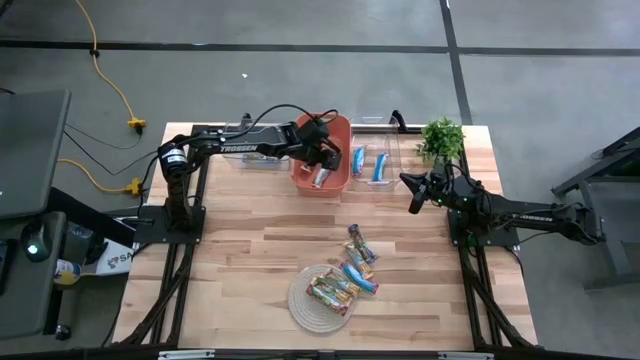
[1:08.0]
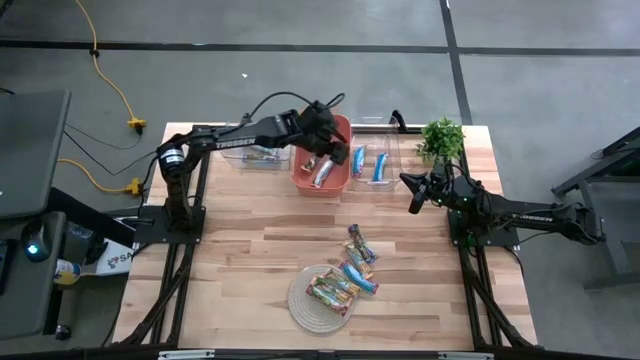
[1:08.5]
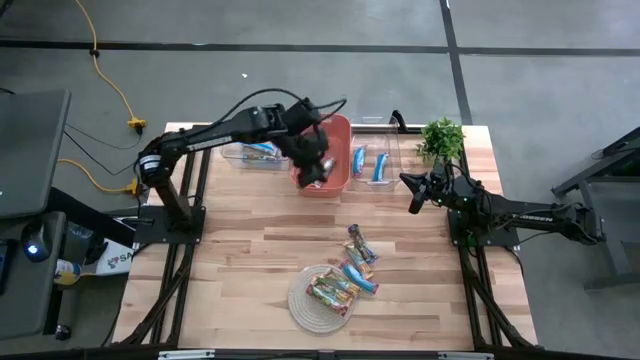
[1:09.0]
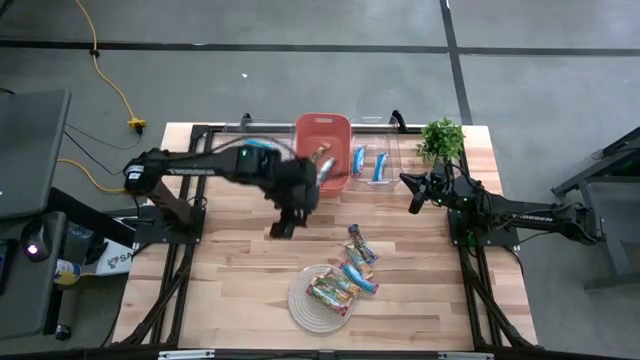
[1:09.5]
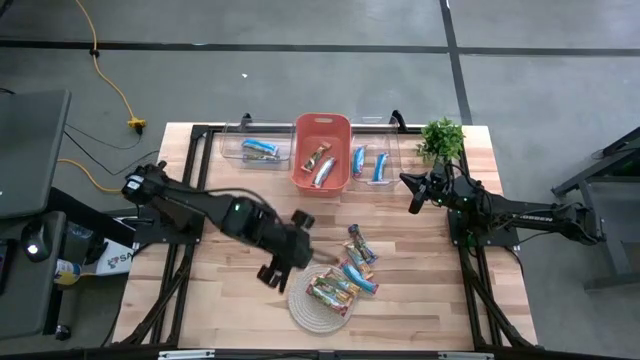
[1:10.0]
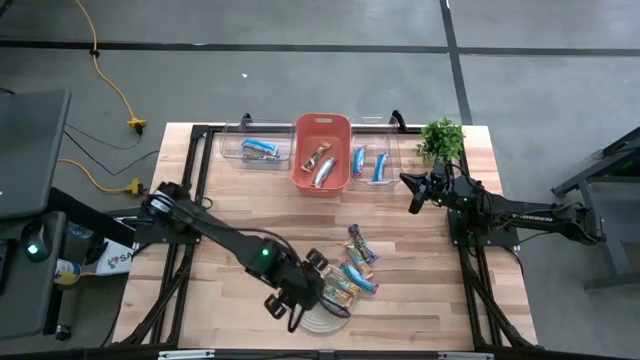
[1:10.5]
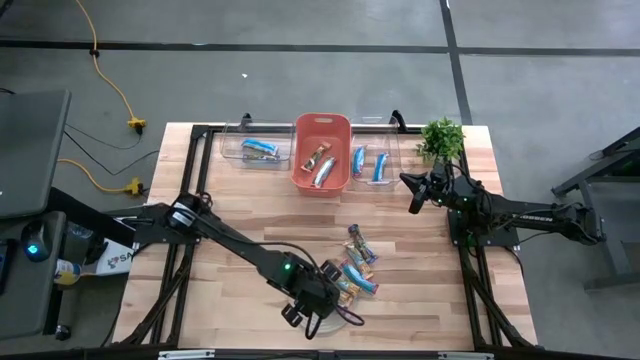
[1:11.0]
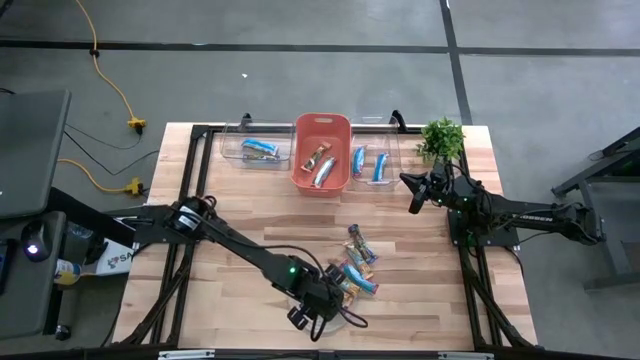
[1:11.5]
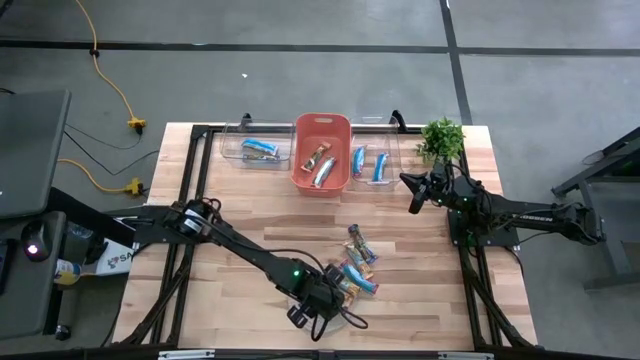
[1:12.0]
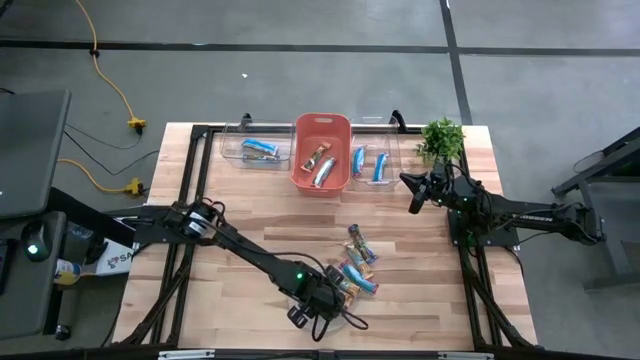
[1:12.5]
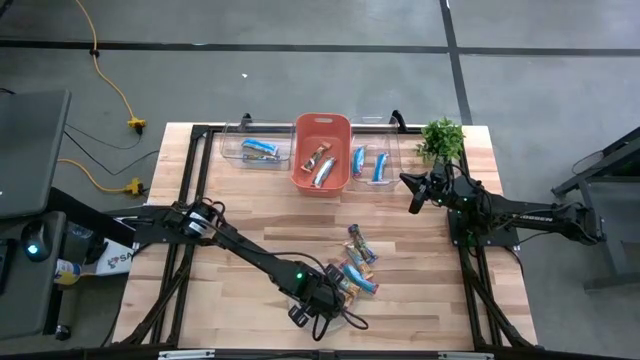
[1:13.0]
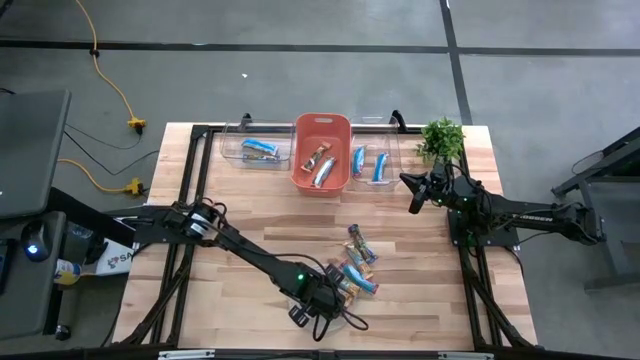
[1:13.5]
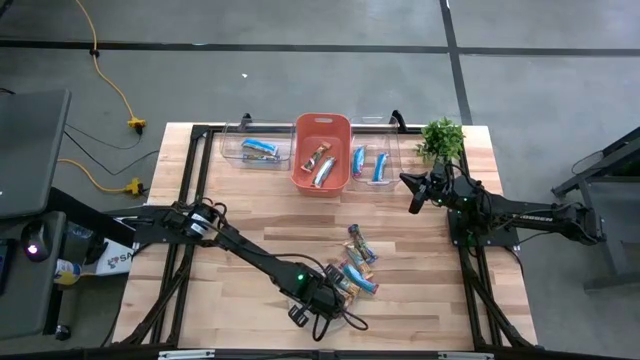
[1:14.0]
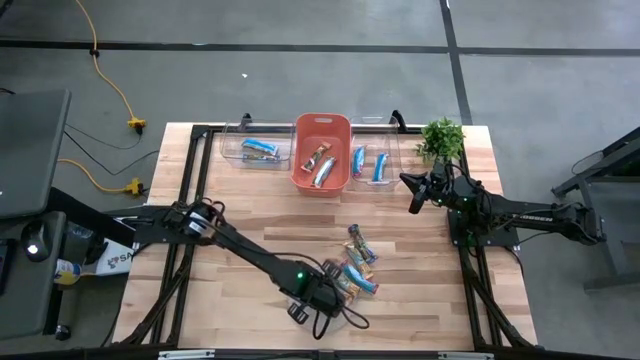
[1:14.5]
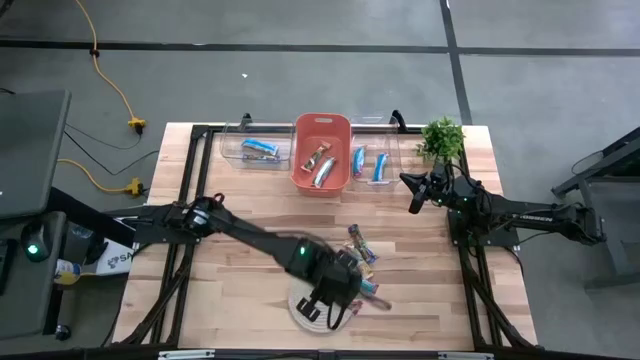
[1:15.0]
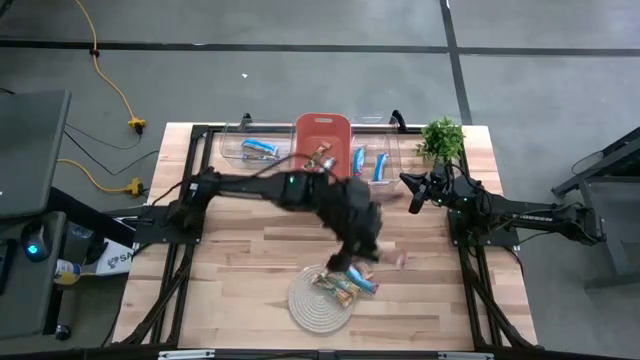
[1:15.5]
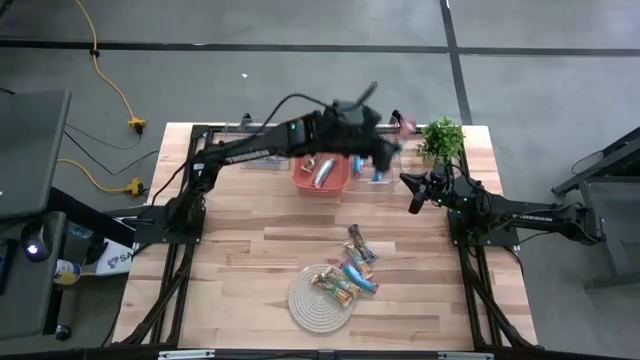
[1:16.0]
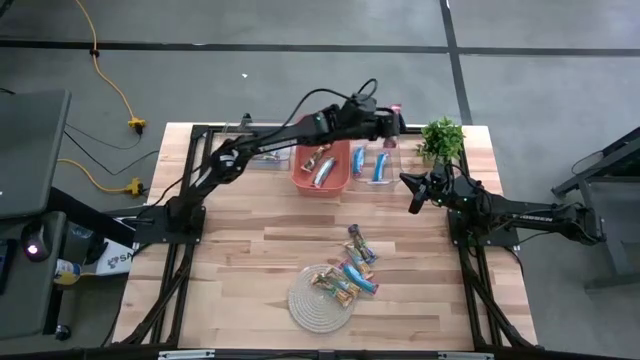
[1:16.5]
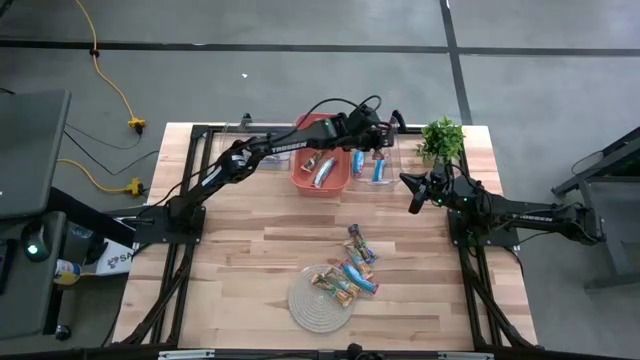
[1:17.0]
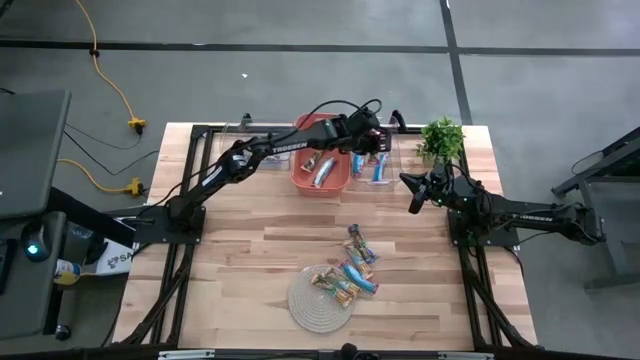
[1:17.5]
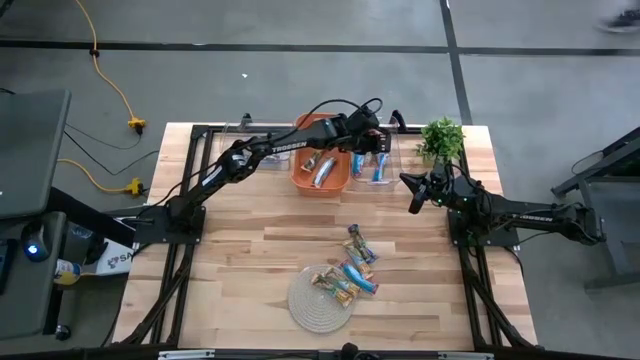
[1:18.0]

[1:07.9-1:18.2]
Task: Pick and place Granola Bars by type
Put the red granola bar into the right transparent bin

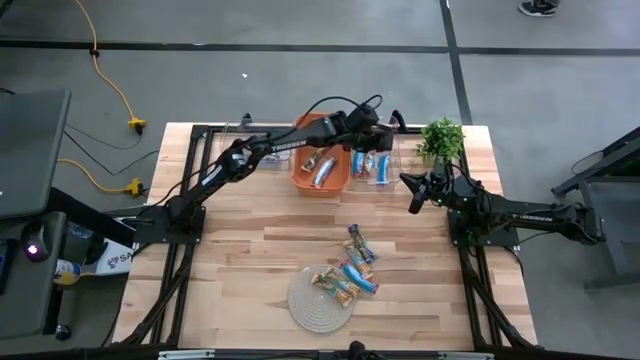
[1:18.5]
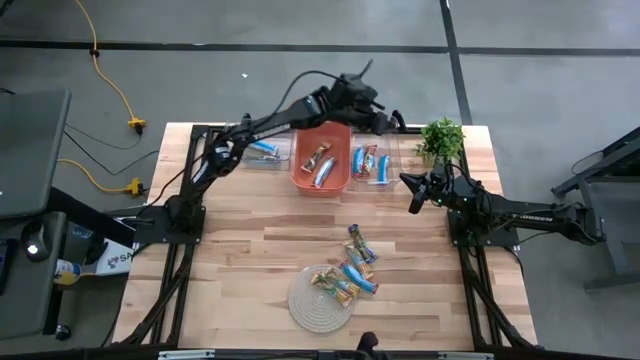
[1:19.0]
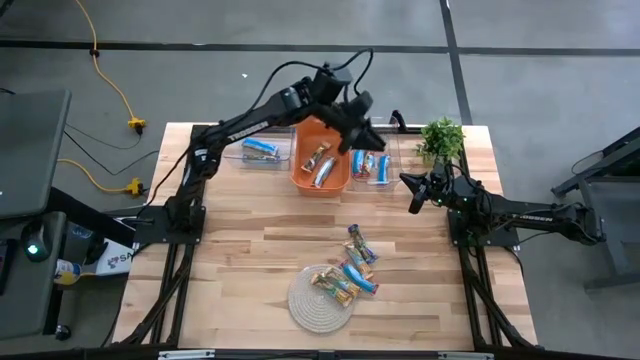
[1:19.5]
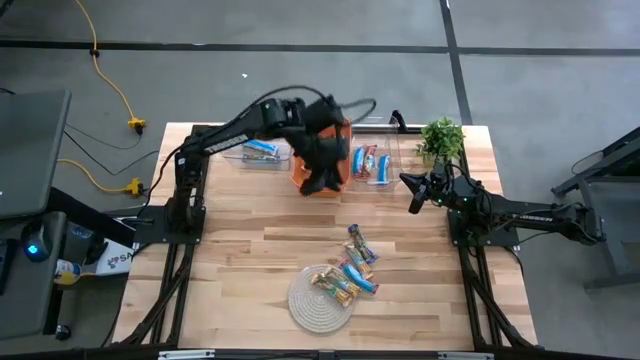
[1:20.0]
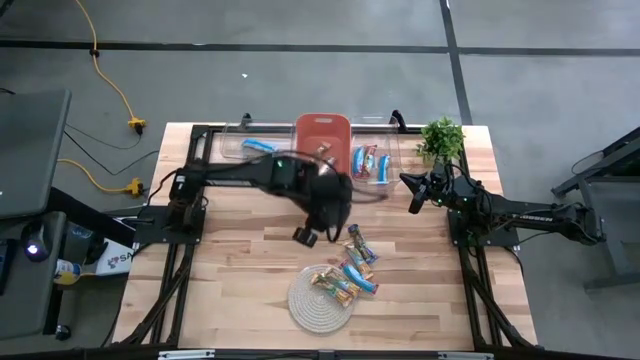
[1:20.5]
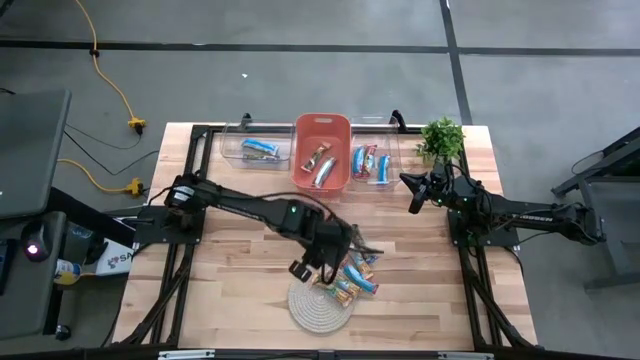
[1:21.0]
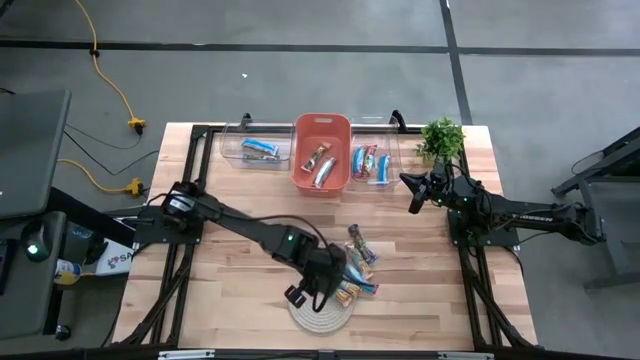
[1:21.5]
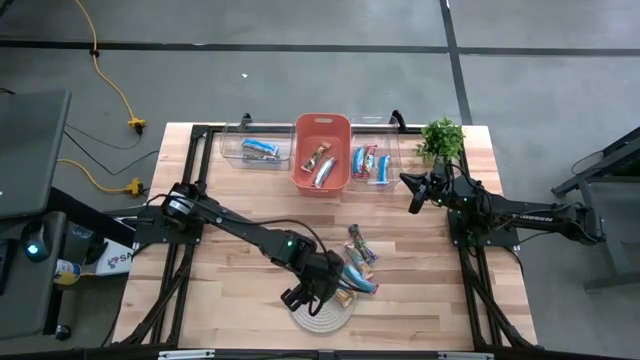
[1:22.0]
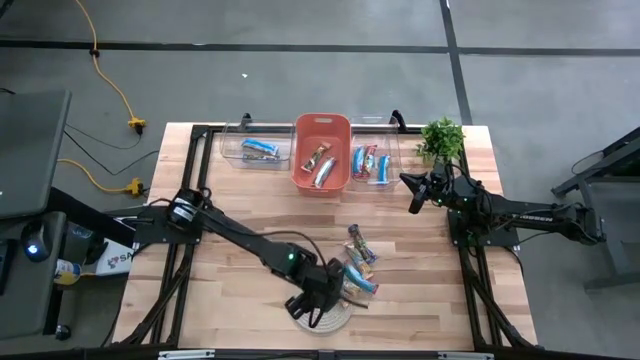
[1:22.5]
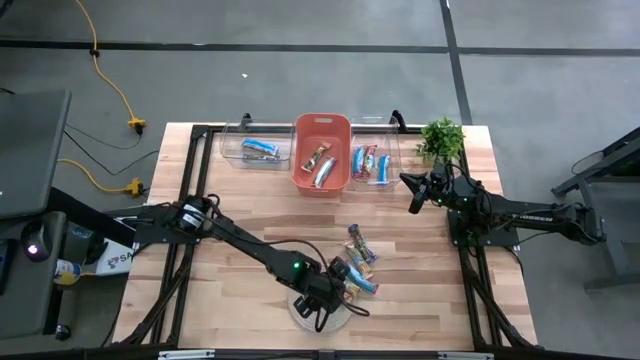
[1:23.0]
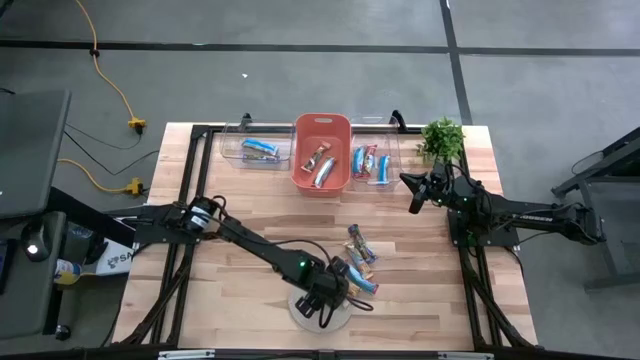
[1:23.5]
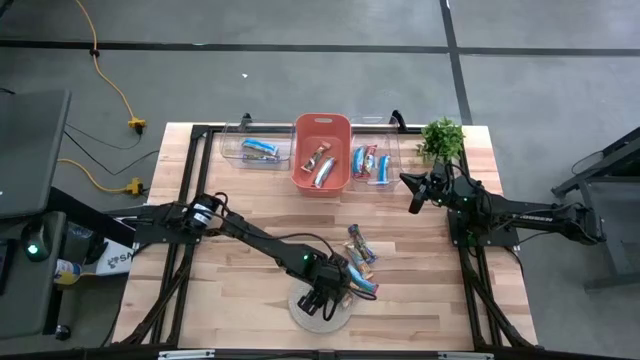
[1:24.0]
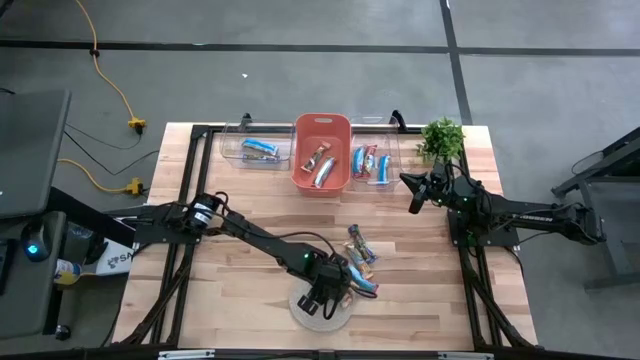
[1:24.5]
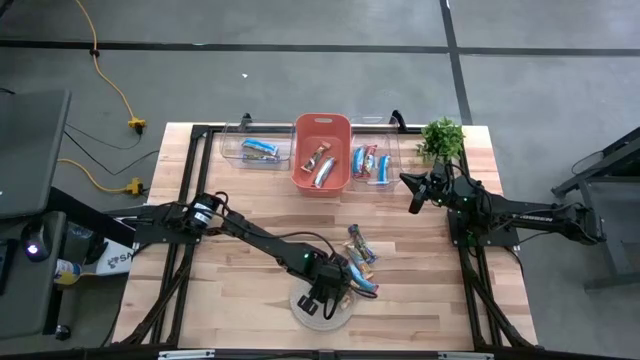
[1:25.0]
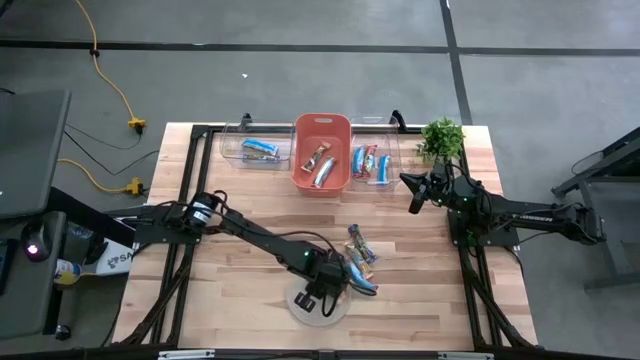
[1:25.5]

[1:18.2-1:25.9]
Put the yellow granola bar into the orange bin

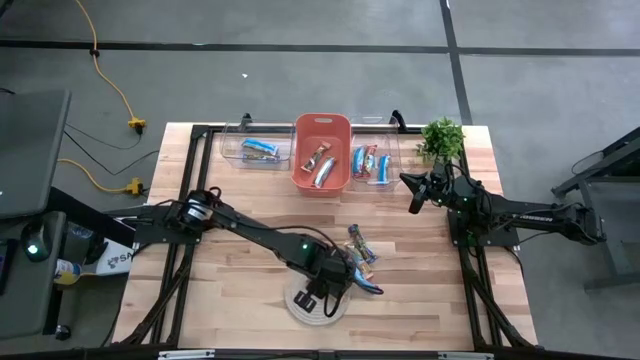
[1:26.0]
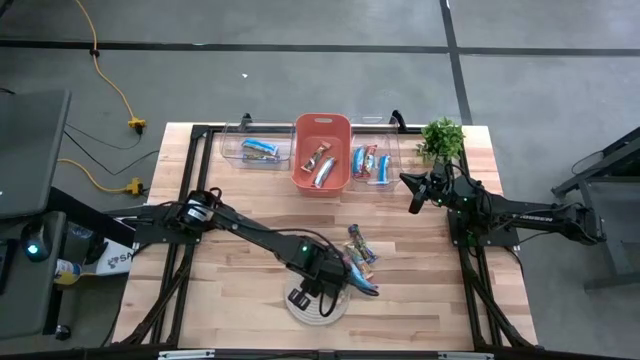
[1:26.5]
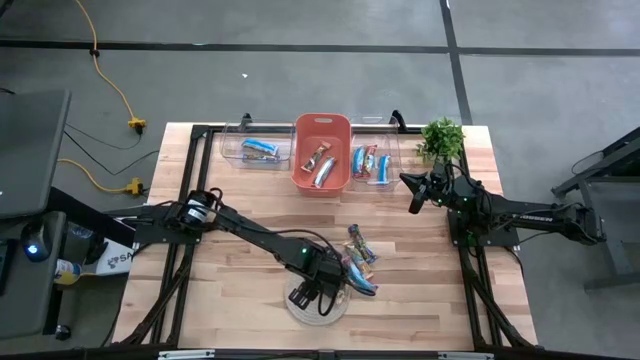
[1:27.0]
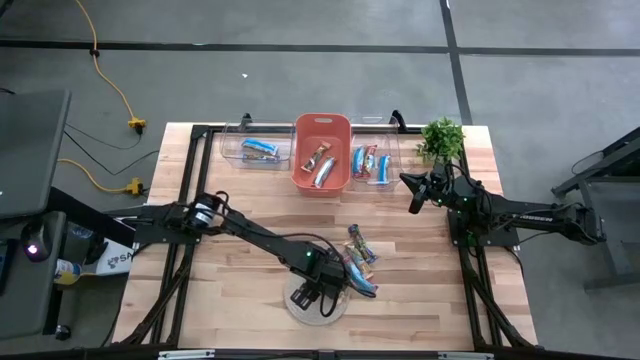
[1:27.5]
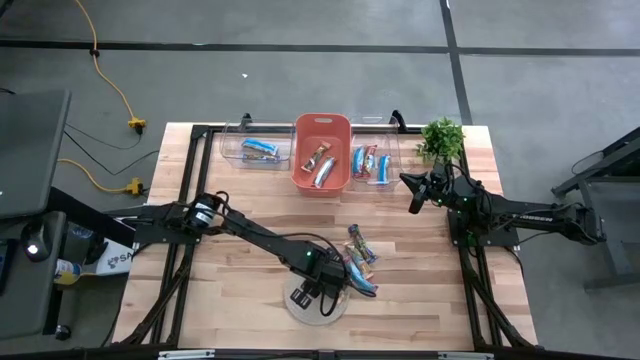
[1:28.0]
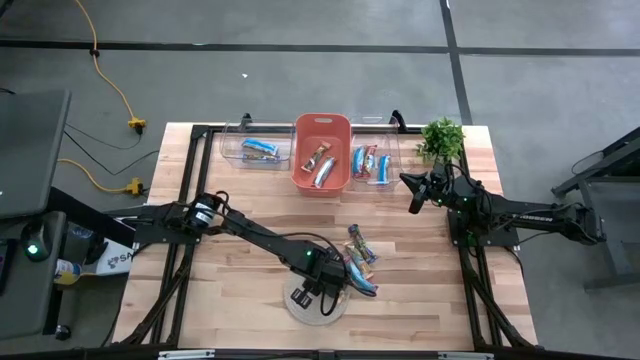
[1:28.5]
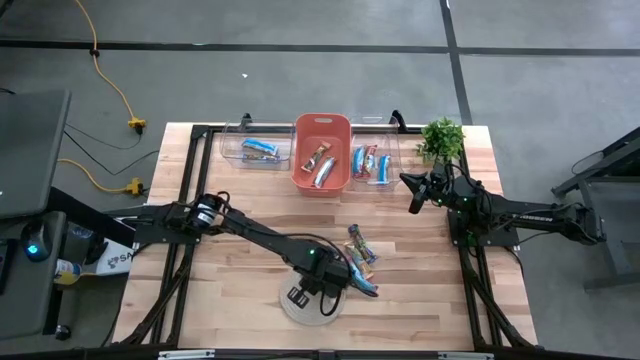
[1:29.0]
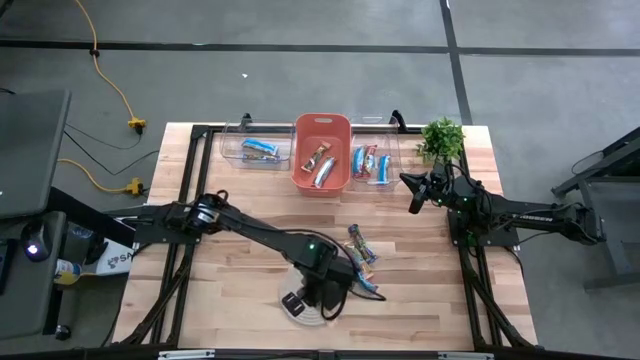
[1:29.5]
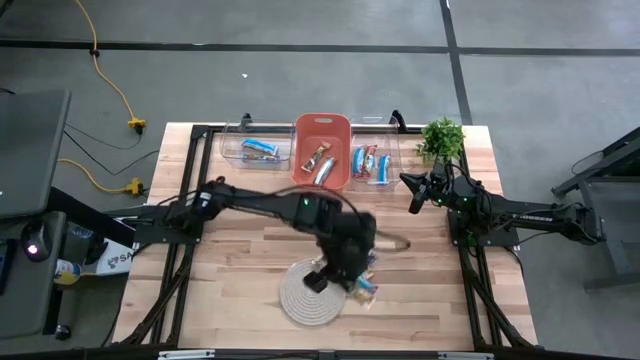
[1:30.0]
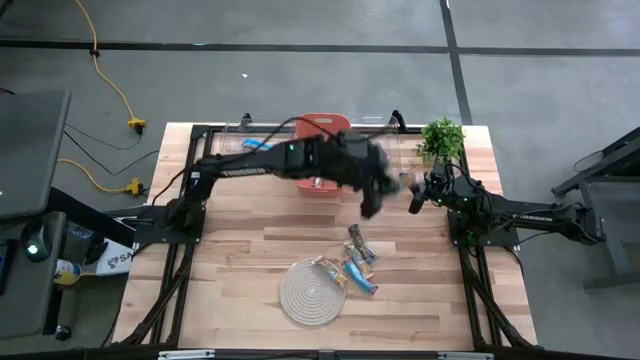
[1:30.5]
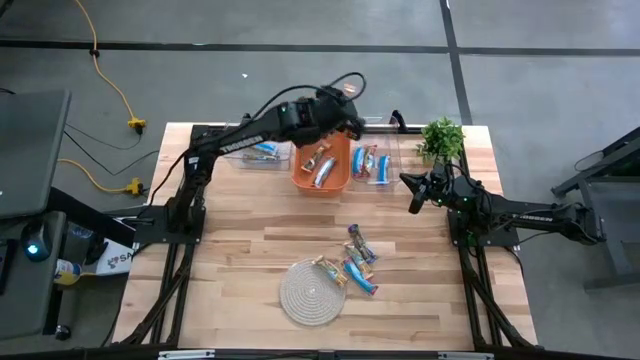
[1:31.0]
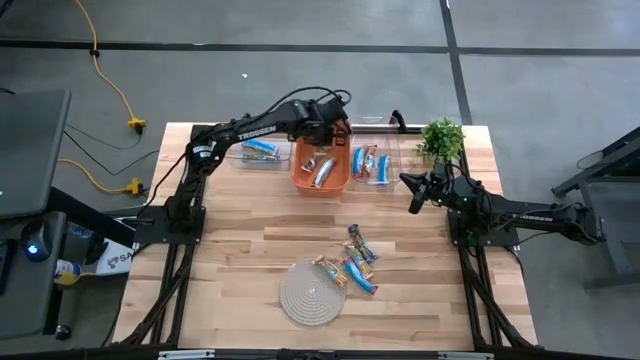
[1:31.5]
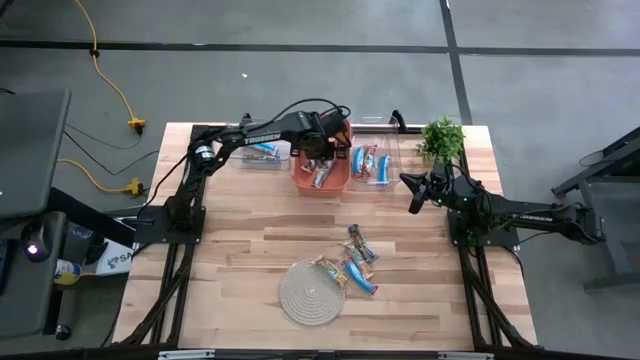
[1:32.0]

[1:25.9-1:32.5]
Put the yellow granola bar into the orange bin
